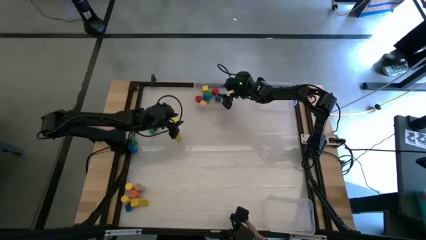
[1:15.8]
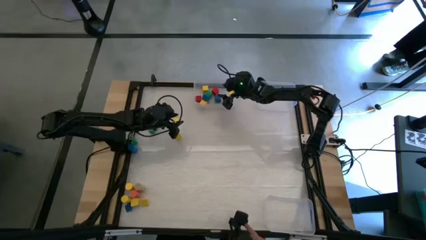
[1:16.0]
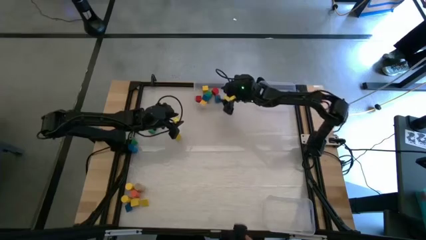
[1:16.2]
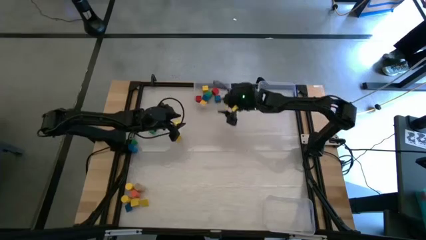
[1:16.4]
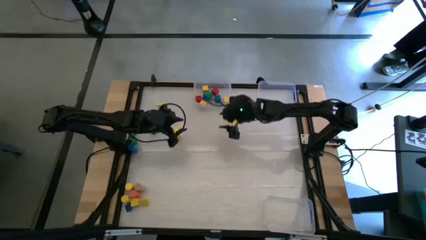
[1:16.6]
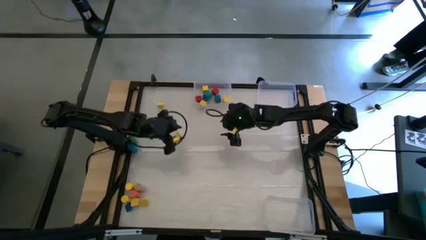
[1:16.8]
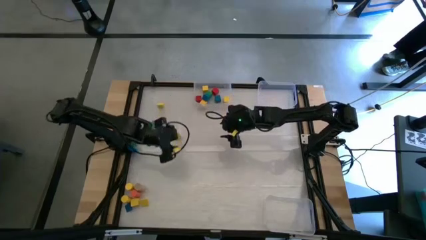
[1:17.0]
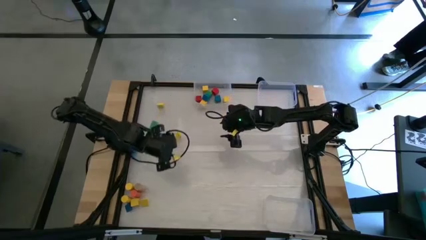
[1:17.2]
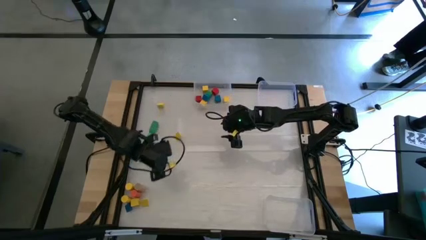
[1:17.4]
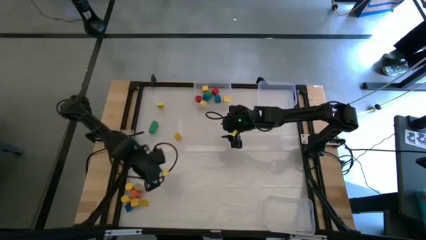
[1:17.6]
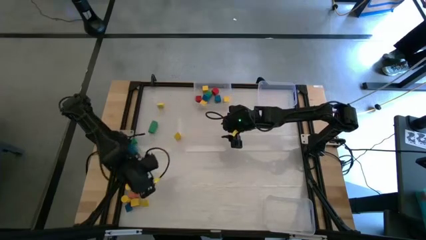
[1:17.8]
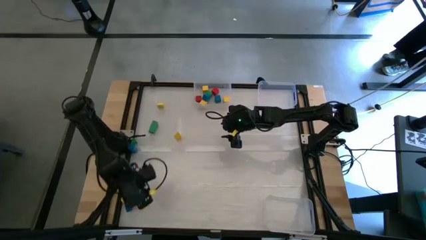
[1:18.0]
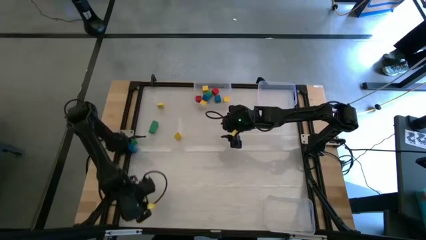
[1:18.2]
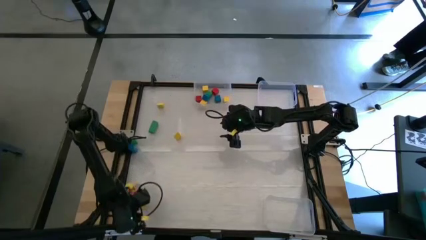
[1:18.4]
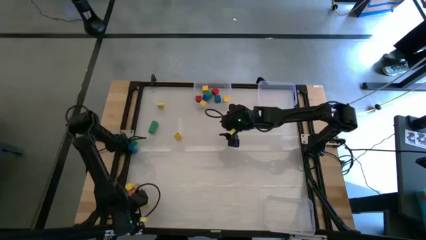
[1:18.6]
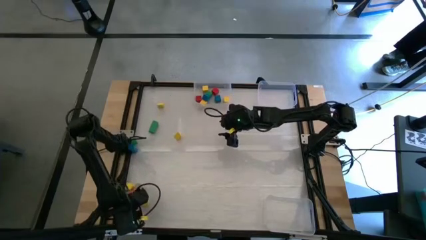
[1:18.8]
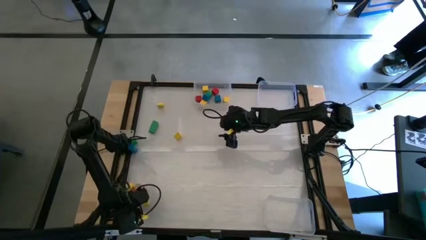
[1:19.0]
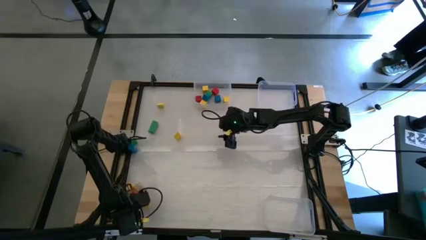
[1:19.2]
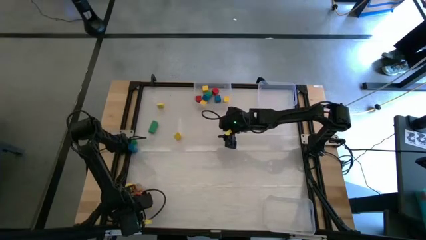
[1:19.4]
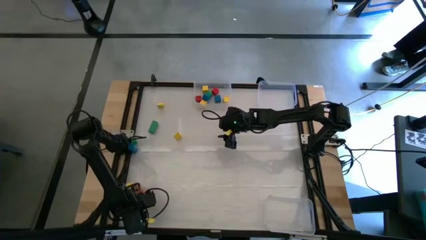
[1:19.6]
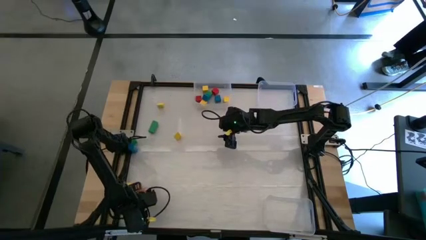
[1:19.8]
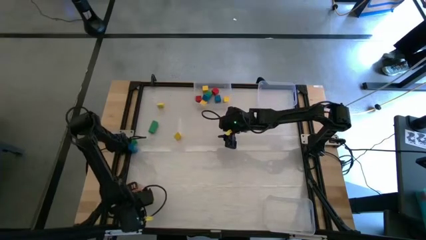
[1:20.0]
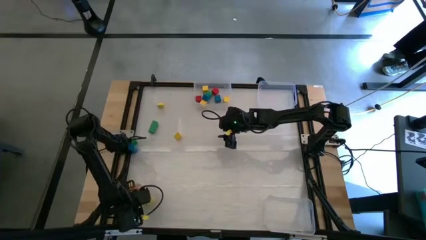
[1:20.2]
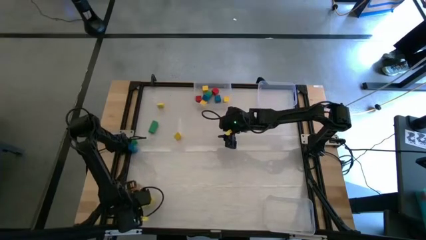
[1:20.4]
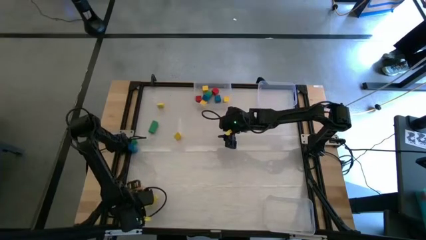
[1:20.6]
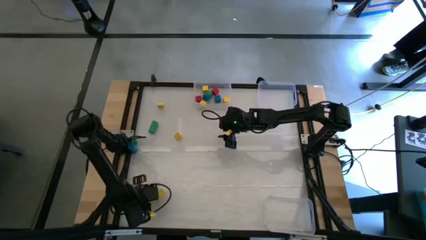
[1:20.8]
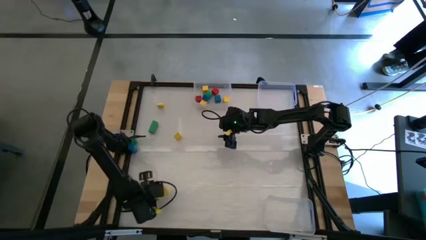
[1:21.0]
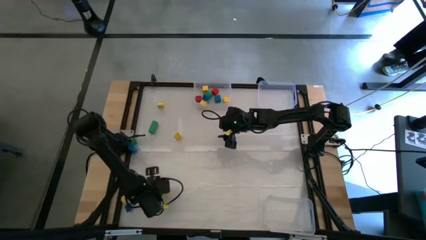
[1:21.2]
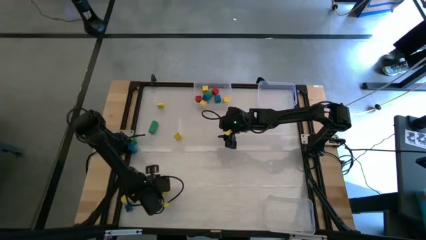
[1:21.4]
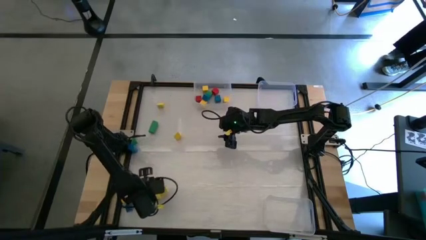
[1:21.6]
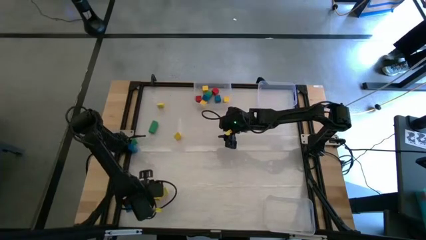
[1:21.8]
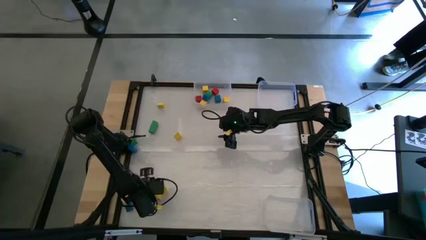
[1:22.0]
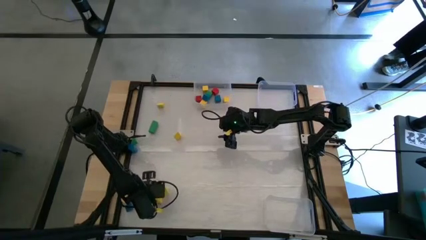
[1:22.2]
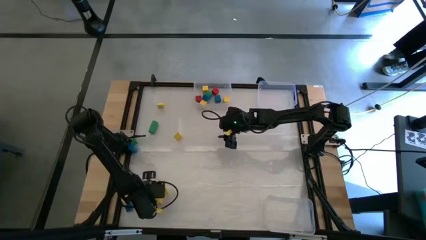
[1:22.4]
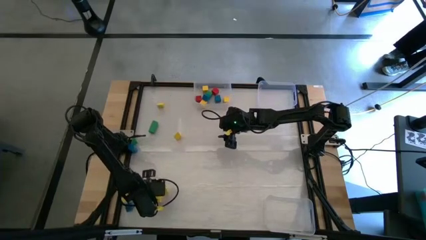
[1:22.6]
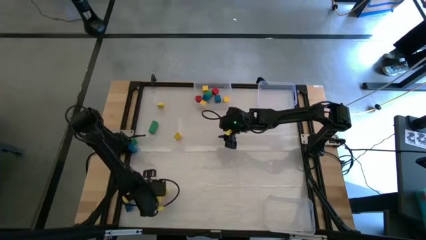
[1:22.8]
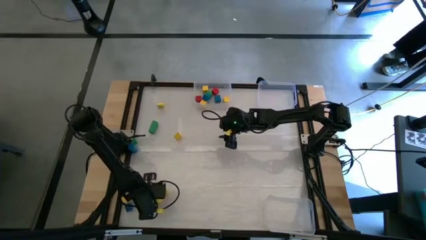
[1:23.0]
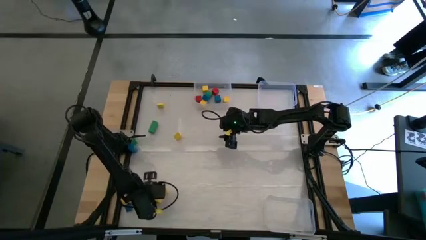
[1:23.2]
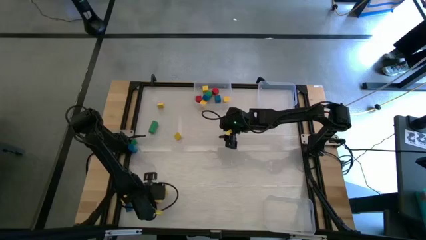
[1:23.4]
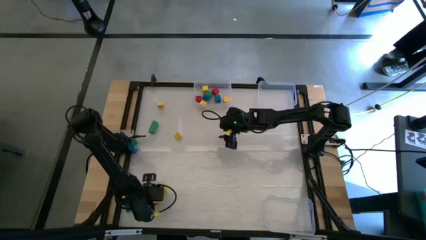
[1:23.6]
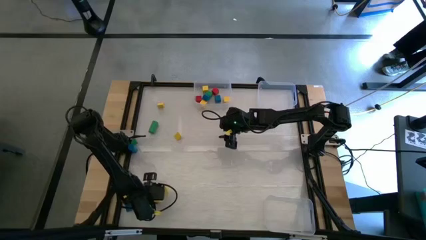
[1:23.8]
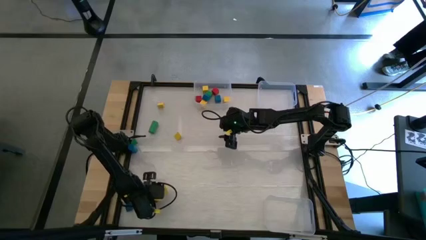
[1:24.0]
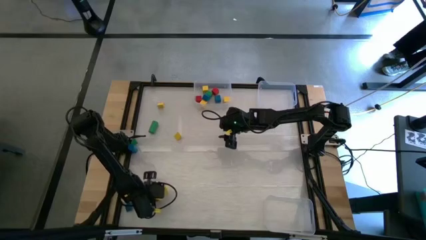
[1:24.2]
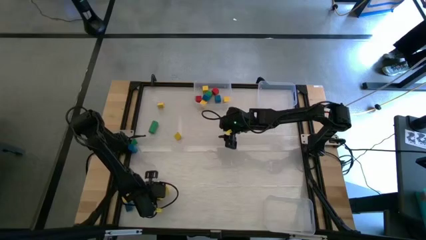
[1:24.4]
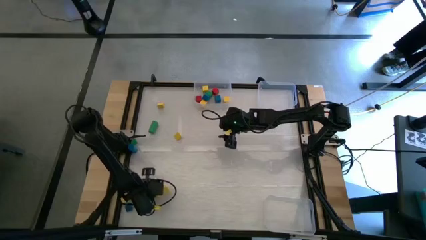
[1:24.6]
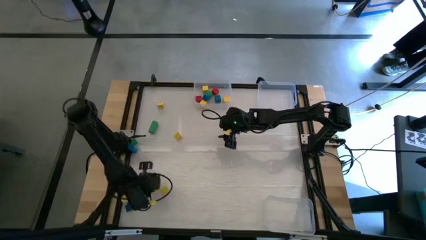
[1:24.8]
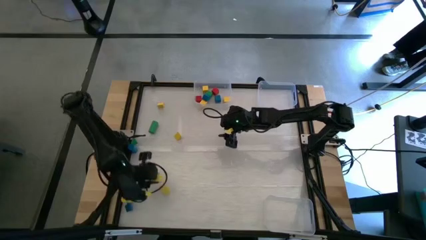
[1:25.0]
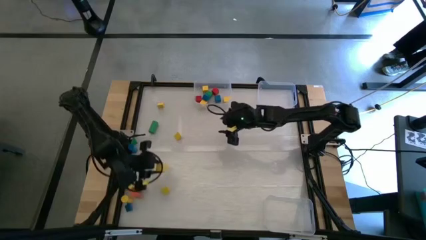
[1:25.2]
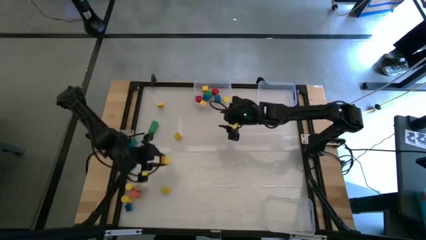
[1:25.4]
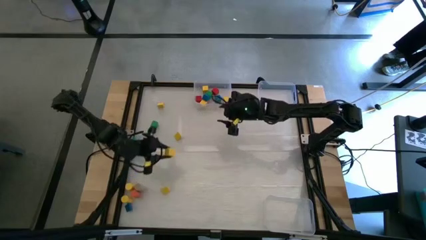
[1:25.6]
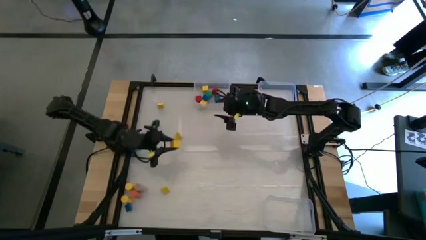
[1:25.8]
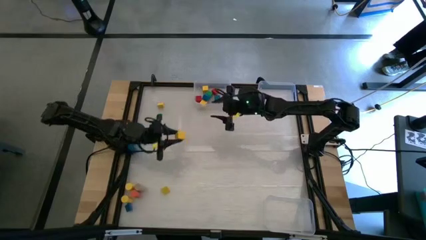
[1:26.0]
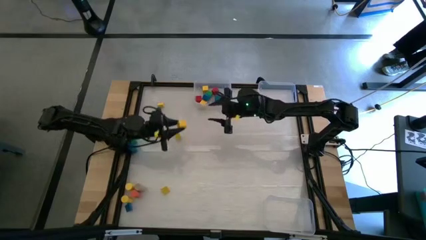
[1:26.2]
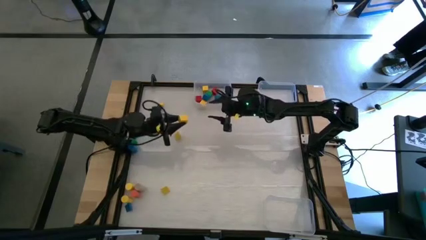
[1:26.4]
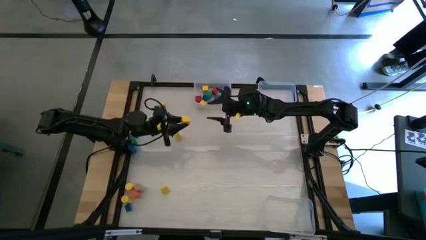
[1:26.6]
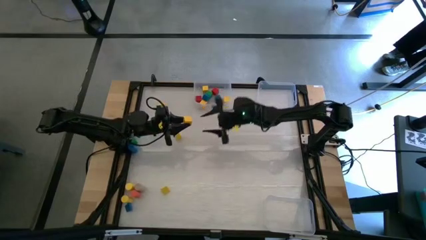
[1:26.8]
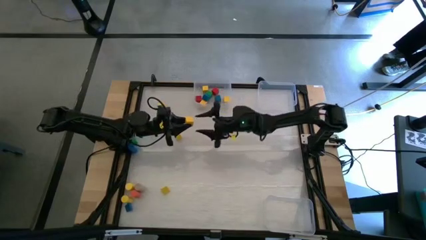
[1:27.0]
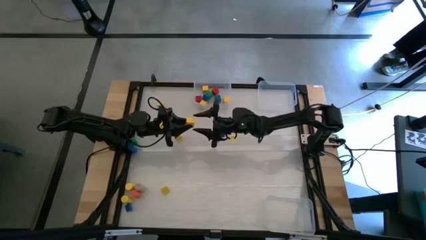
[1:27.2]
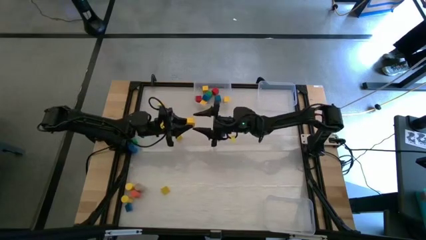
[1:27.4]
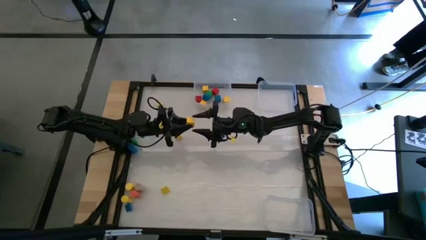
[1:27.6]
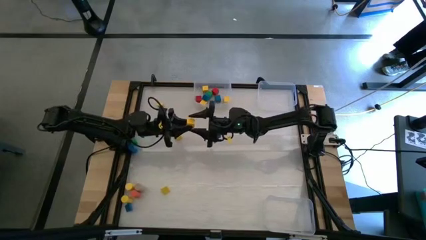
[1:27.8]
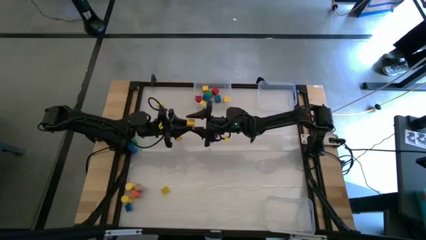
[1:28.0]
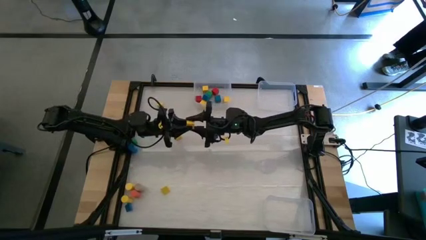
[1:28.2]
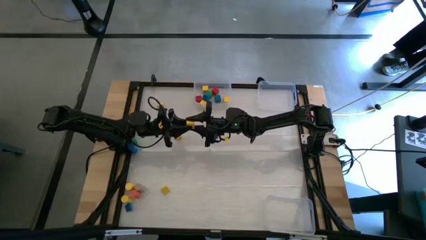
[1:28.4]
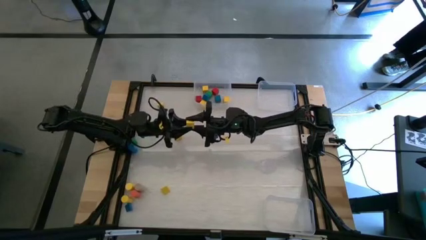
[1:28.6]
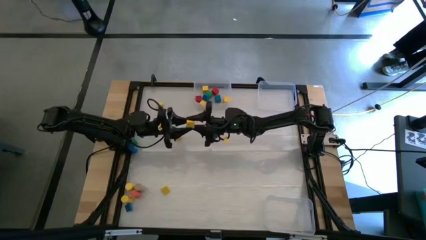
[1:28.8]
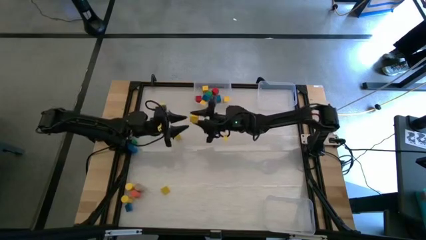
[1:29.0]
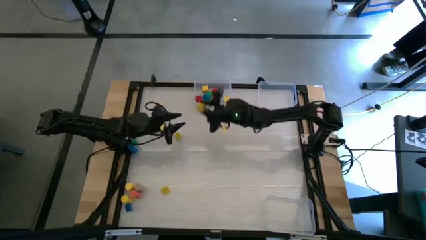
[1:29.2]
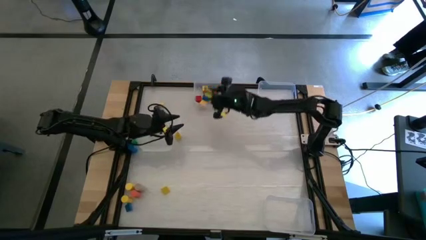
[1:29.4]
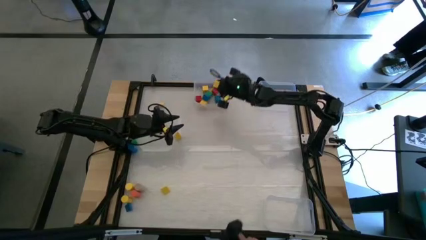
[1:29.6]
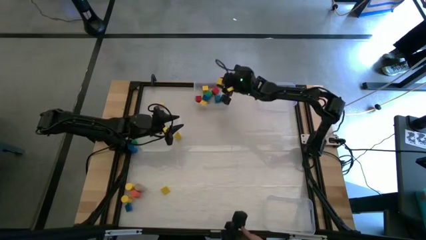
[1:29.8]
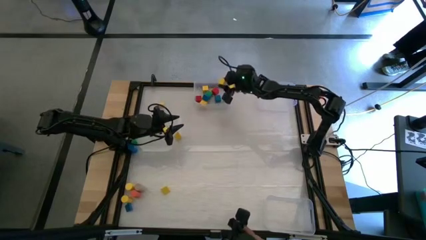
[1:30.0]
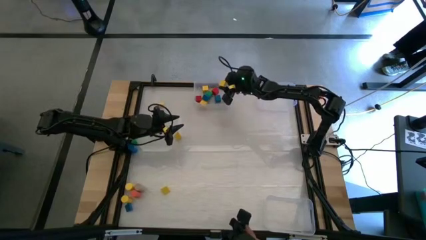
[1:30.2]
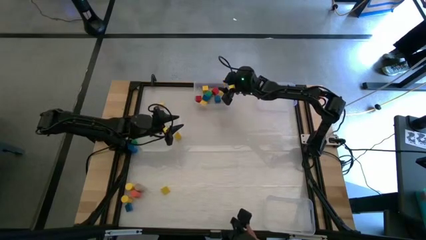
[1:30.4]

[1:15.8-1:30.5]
Task: Sort blocks by size
Put the square yellow block into the top left transparent bin
